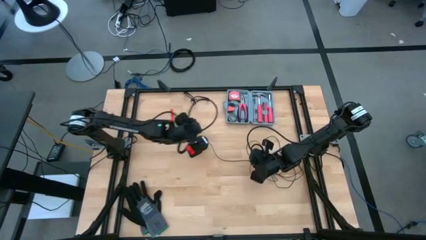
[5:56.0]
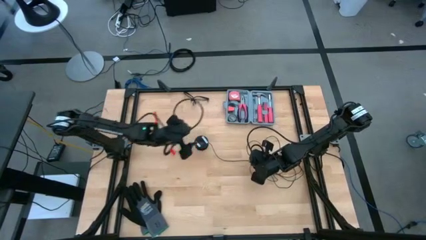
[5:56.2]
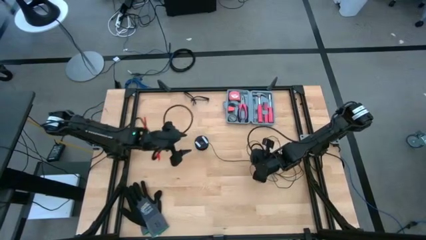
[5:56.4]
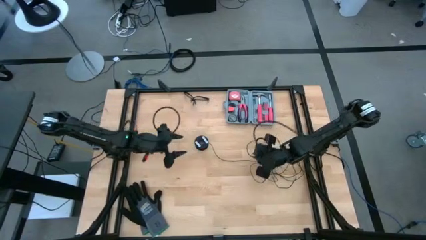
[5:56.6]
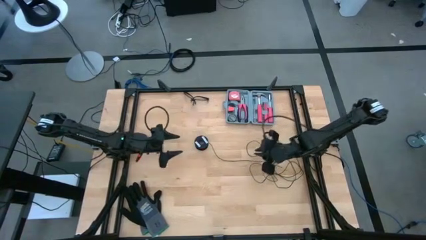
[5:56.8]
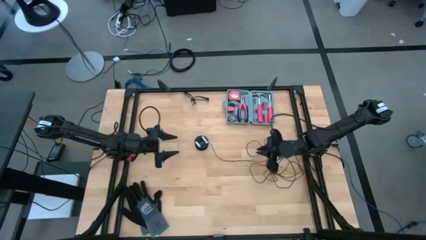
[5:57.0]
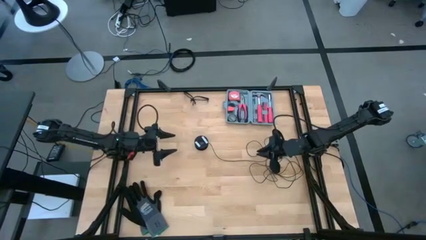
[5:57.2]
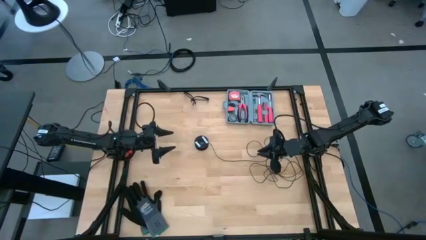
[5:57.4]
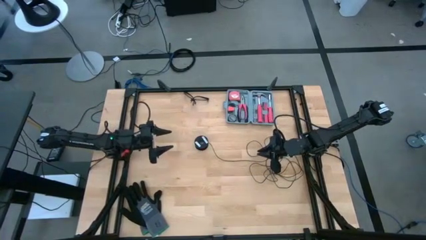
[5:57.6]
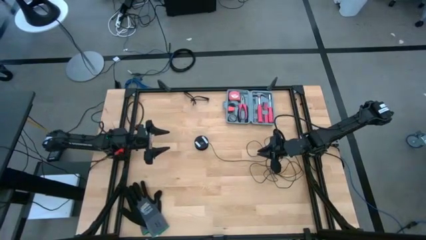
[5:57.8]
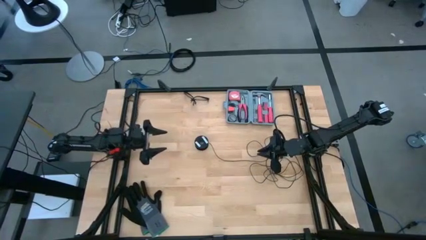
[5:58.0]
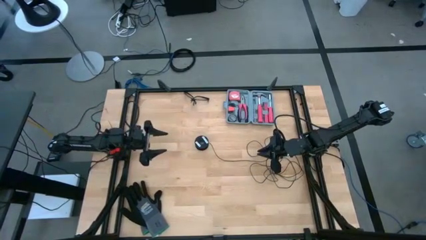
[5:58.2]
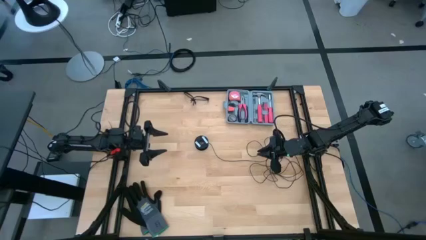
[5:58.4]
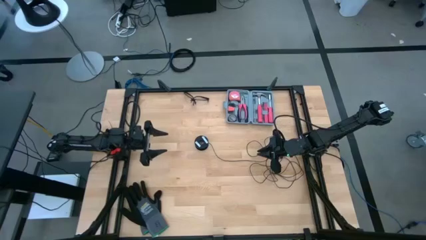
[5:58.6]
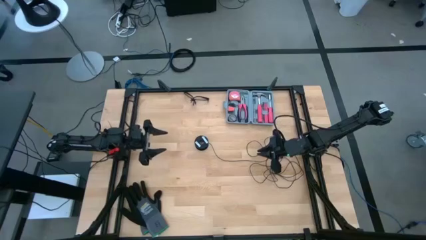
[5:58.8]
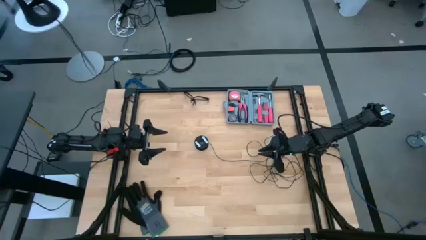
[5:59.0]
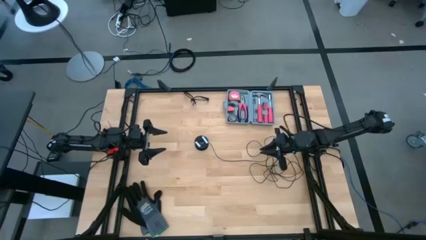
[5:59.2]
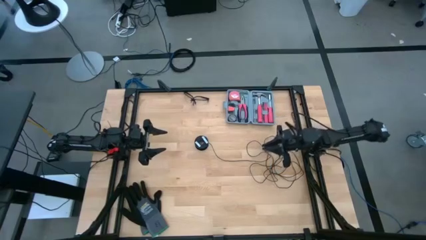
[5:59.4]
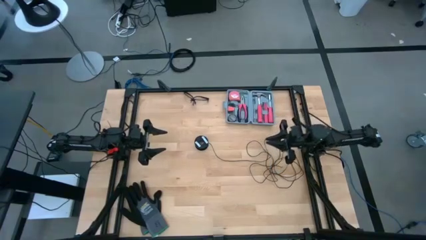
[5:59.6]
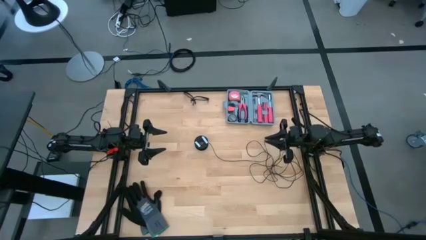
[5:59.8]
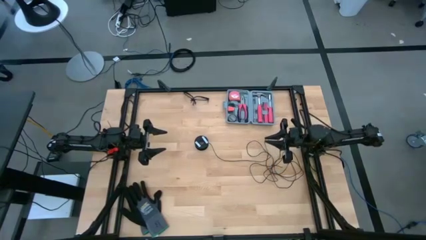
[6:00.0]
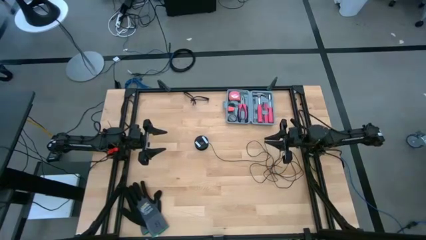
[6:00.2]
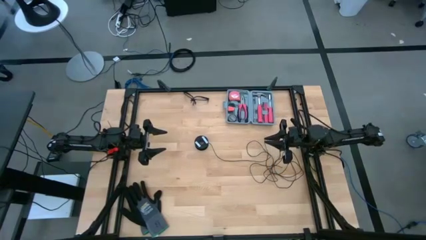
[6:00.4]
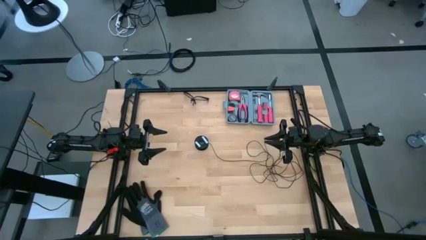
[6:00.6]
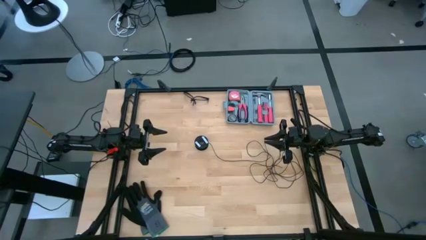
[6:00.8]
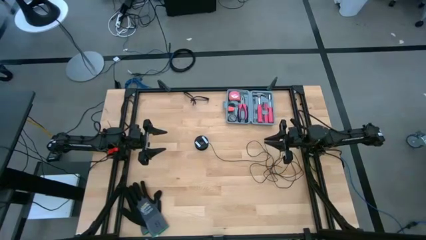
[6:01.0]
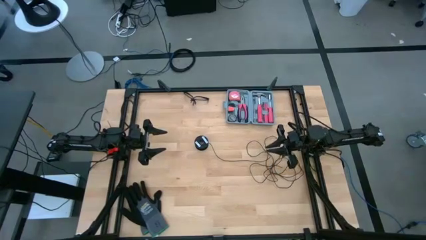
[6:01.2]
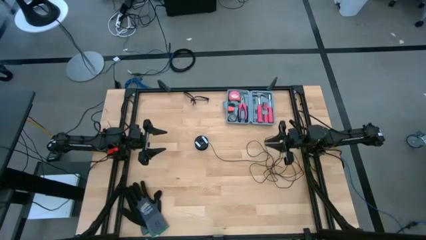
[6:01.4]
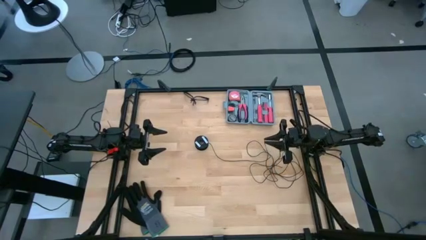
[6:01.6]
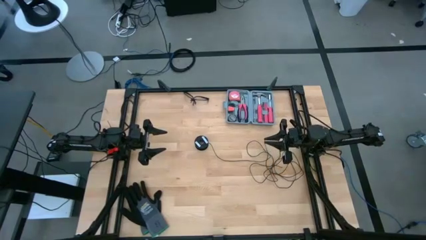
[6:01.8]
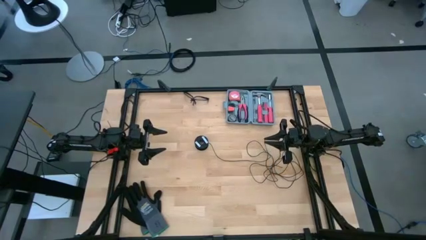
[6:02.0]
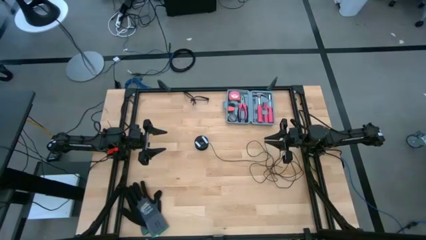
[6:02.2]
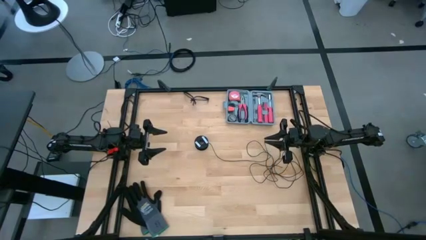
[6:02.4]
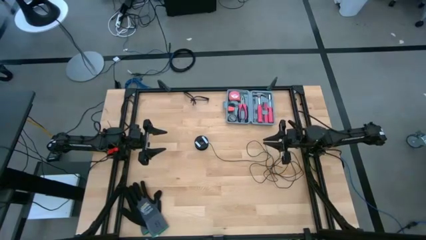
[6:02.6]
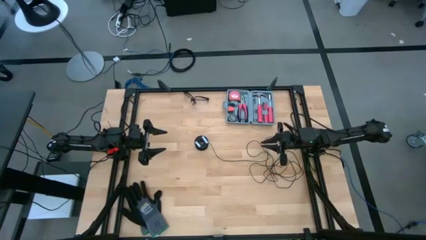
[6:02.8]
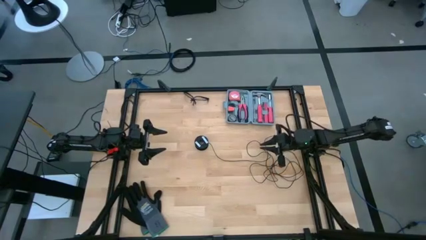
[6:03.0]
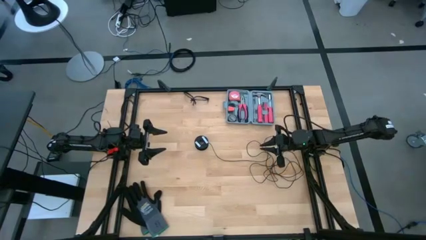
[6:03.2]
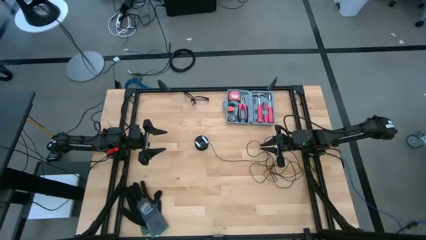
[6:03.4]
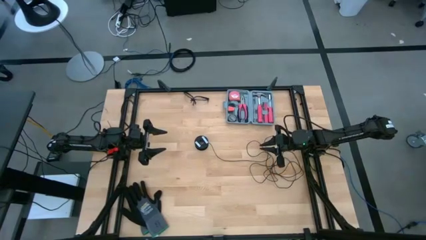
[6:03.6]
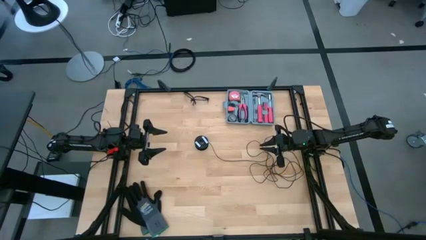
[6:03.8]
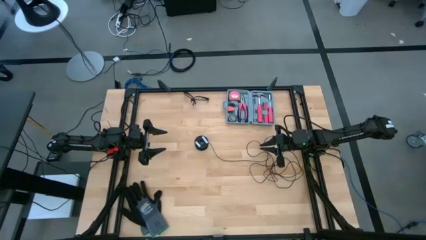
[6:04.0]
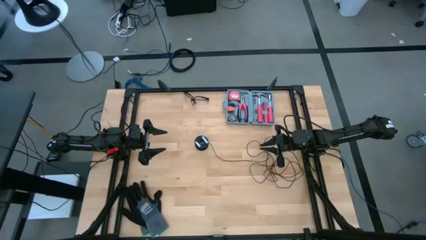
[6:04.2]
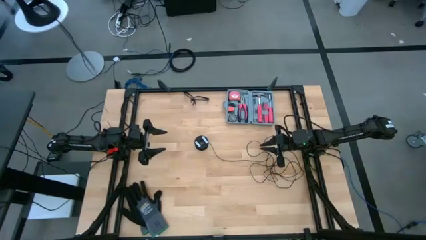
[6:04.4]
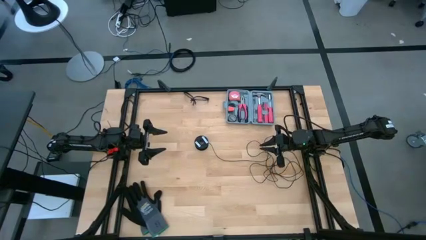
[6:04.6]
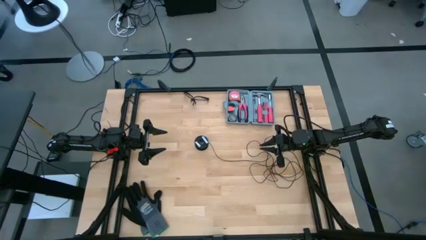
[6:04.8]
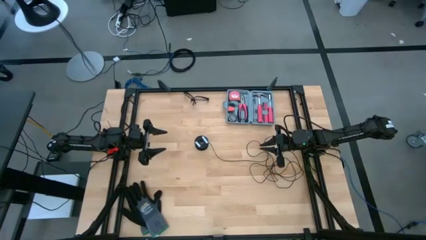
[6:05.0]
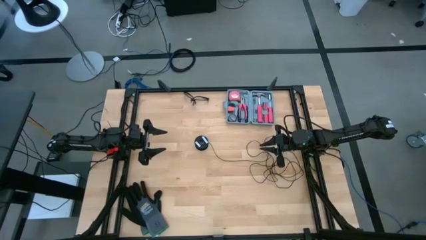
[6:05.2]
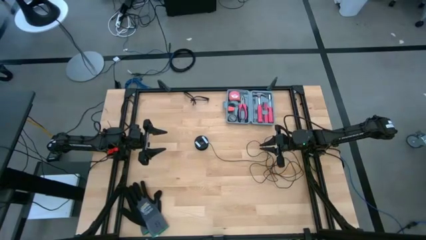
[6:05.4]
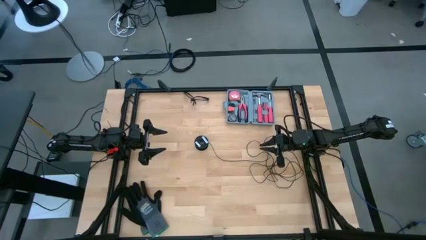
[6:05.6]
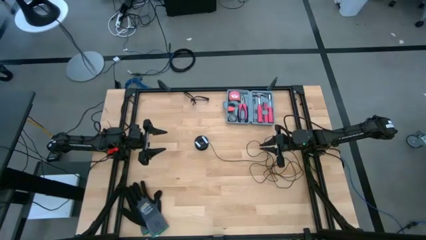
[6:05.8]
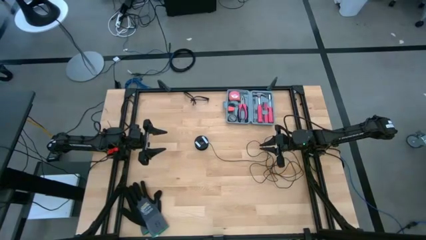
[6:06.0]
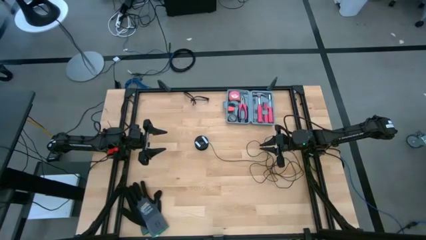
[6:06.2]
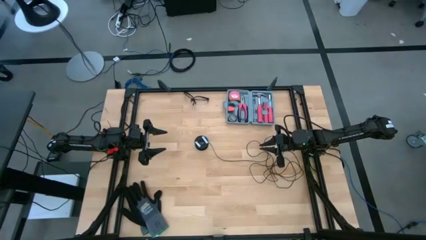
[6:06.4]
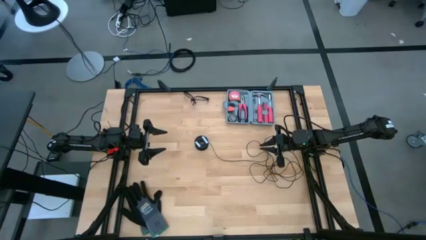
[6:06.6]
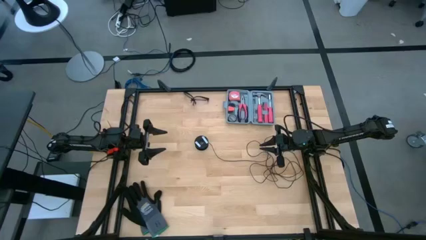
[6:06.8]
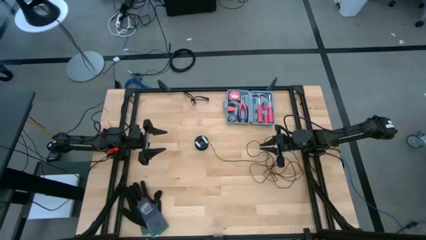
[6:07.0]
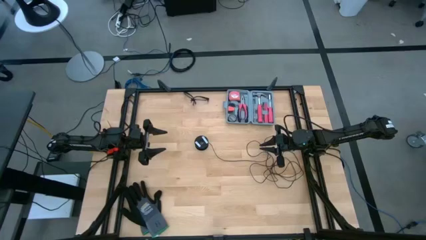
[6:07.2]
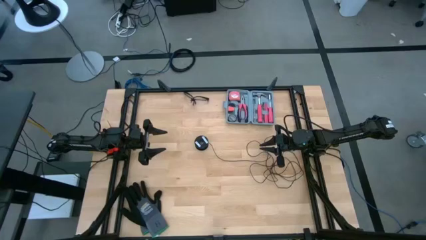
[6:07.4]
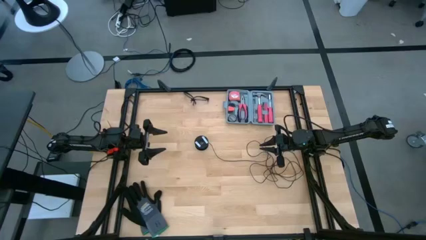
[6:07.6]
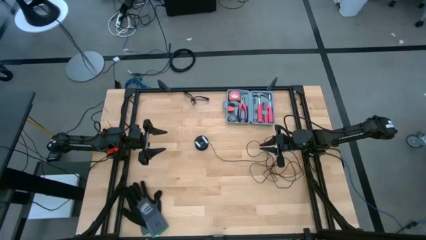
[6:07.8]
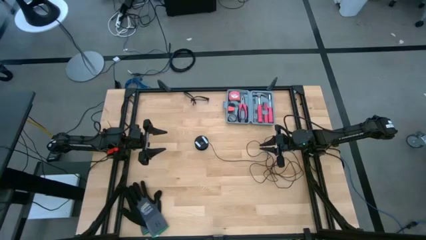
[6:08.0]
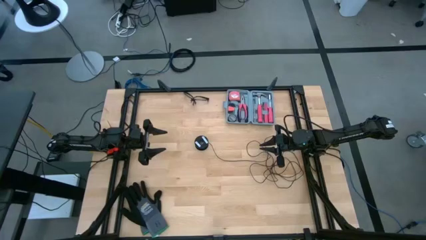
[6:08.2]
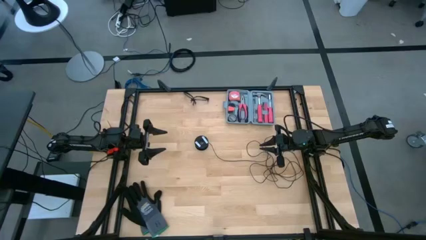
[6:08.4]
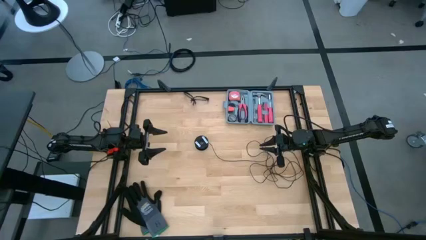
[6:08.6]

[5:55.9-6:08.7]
Task: Coil cords
Return to Home Position

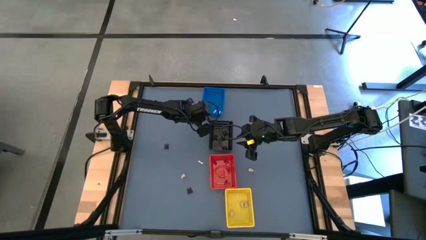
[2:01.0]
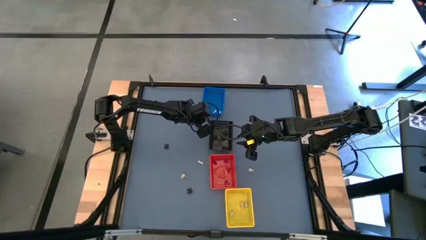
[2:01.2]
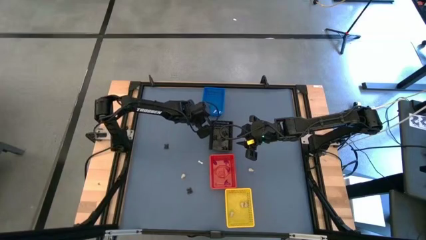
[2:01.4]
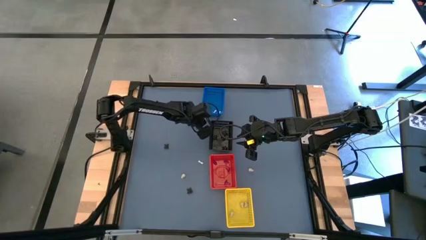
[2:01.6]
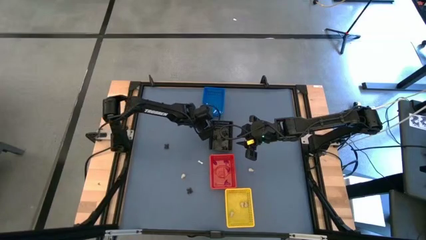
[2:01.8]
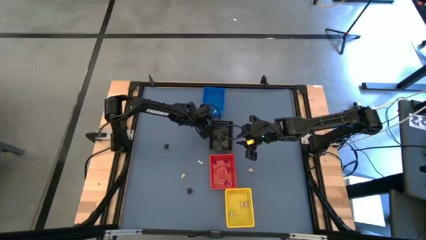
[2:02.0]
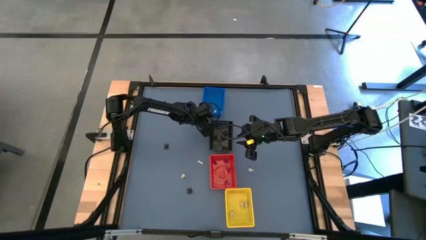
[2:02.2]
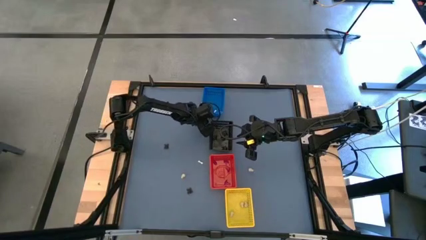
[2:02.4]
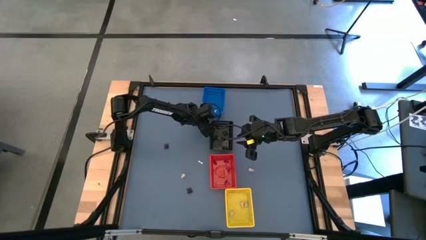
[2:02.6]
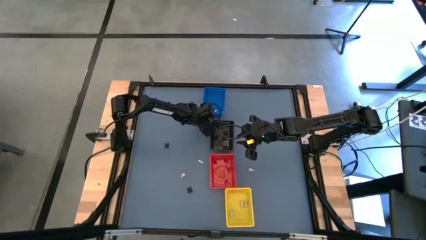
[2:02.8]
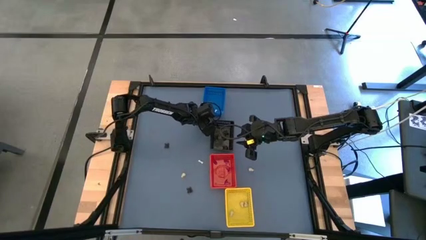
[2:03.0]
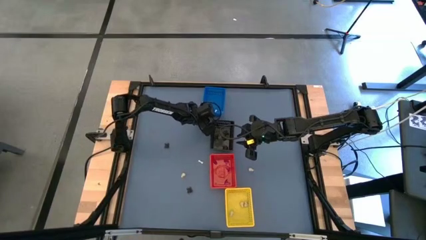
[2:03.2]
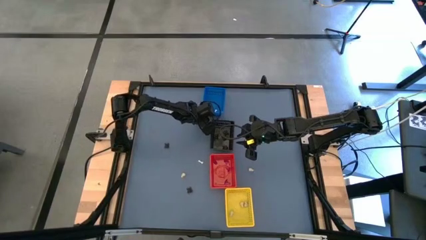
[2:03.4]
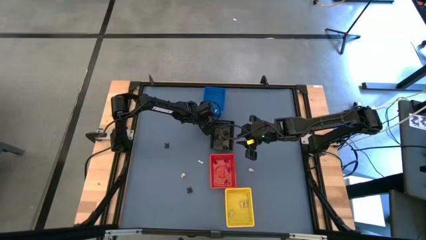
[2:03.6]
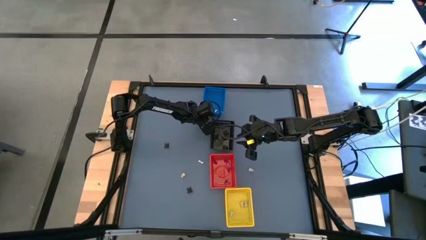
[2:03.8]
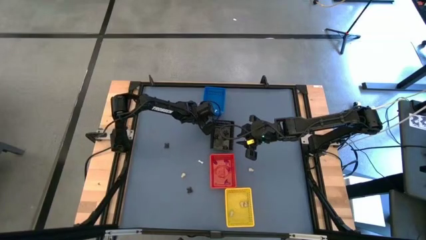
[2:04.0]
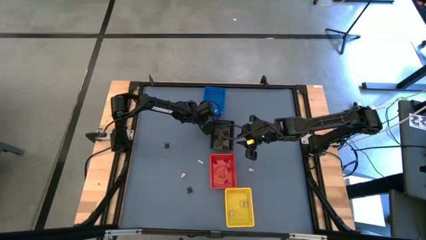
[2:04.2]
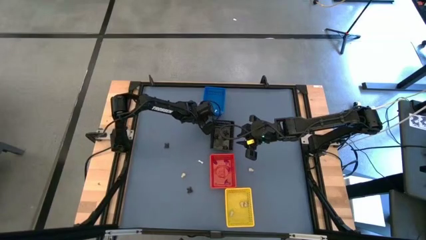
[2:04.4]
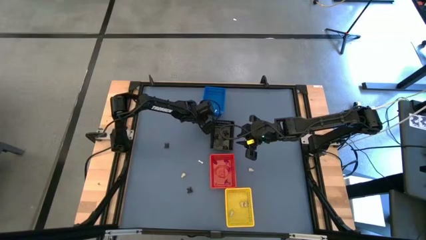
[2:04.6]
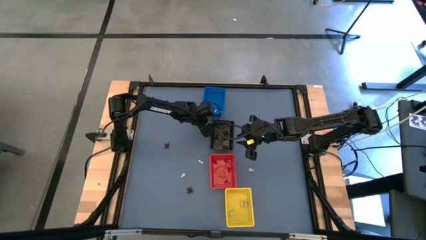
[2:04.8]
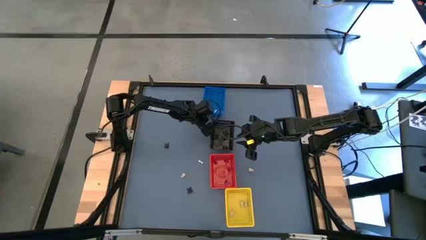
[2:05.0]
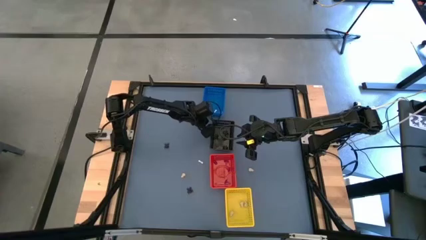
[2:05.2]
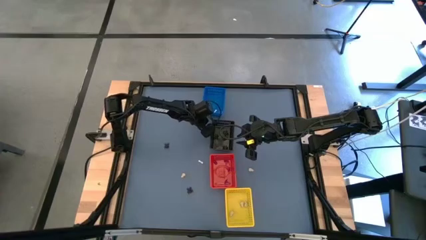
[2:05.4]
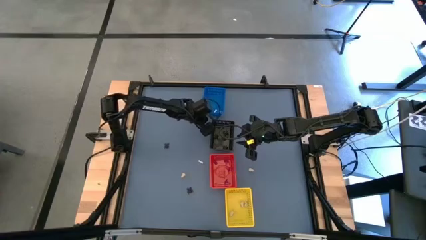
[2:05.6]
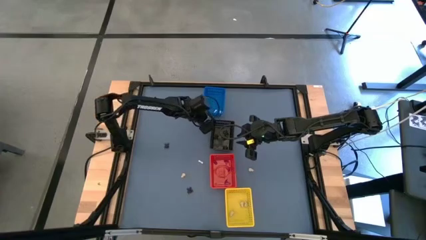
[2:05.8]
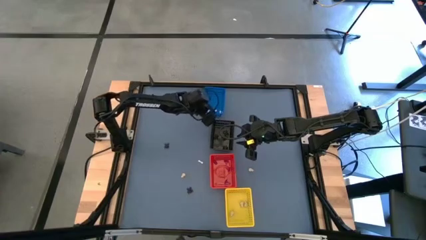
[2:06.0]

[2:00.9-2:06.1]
Task: Sort Halloween decoration
Put the white bone toy into the blue bin
